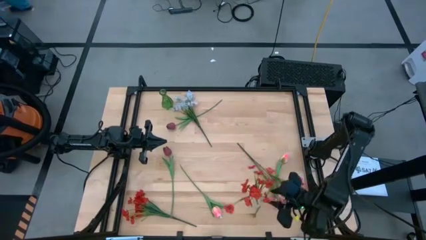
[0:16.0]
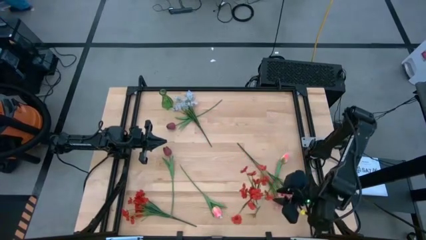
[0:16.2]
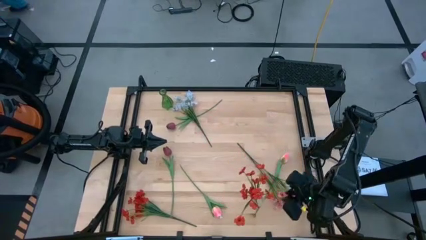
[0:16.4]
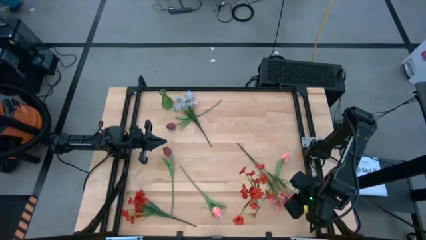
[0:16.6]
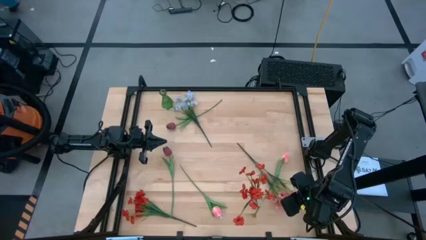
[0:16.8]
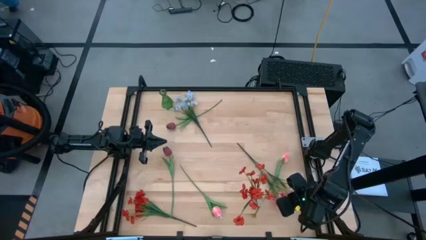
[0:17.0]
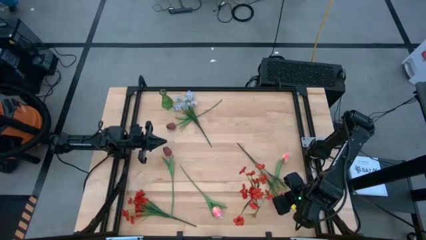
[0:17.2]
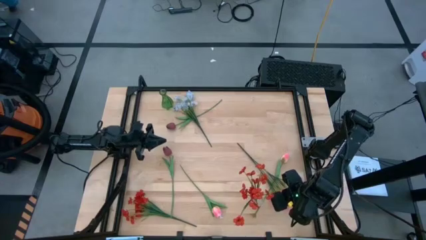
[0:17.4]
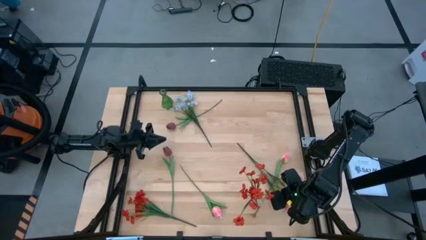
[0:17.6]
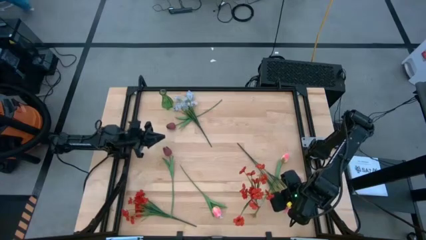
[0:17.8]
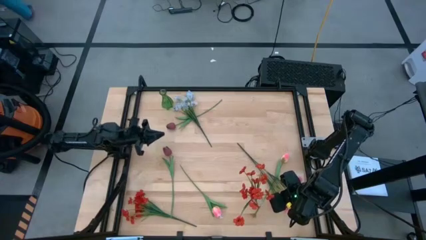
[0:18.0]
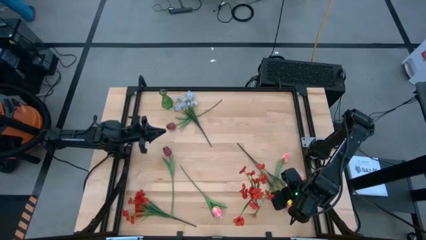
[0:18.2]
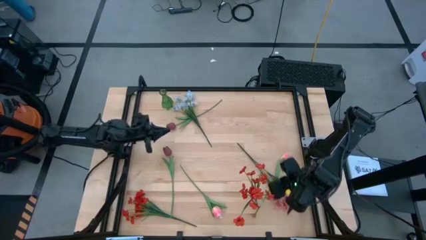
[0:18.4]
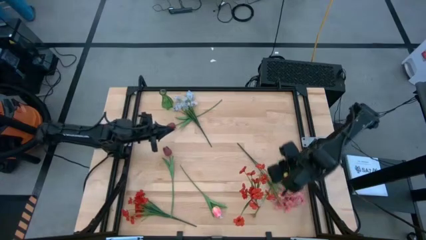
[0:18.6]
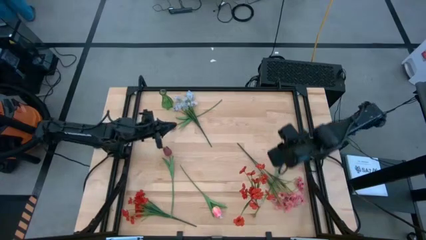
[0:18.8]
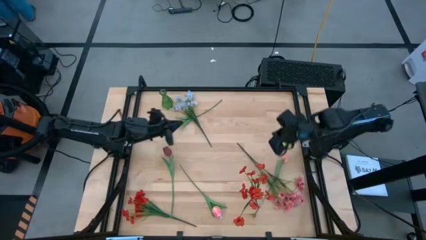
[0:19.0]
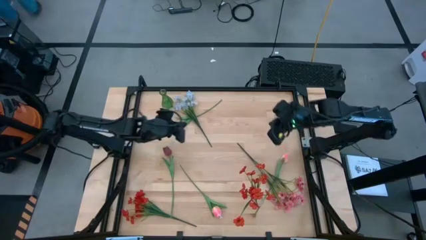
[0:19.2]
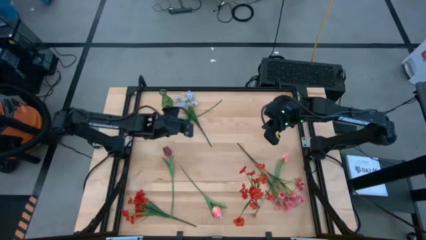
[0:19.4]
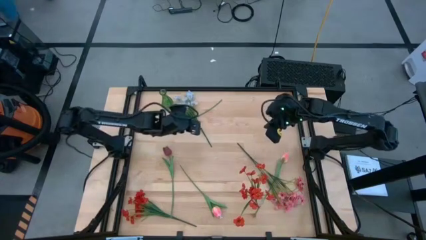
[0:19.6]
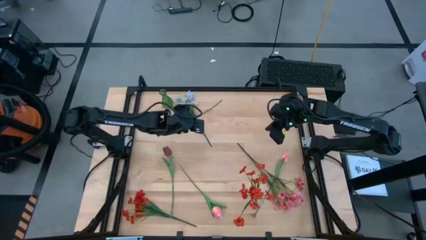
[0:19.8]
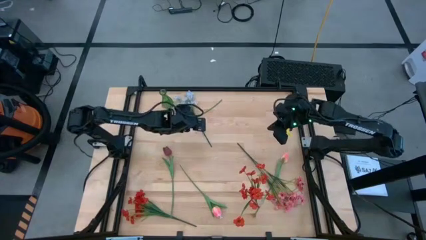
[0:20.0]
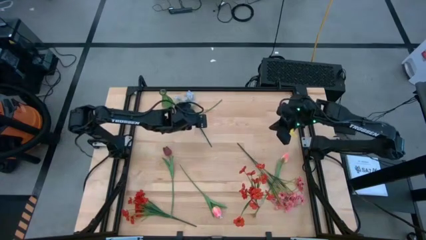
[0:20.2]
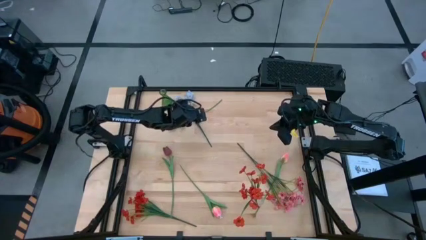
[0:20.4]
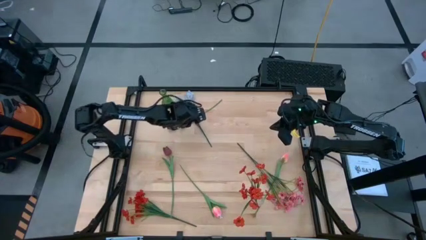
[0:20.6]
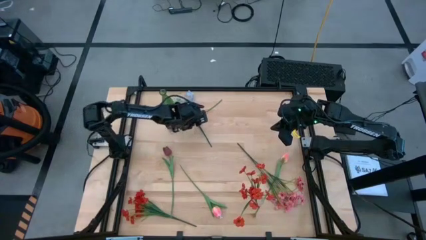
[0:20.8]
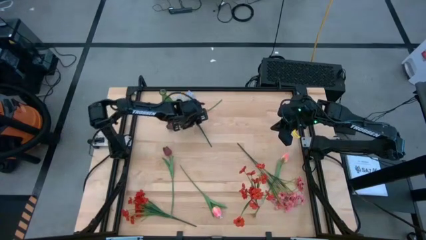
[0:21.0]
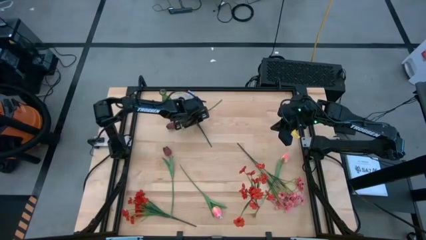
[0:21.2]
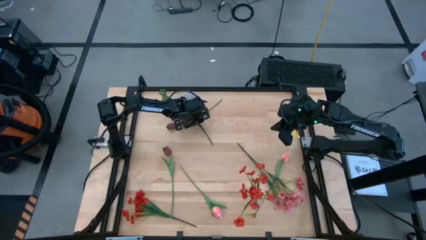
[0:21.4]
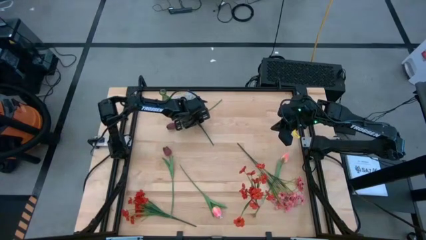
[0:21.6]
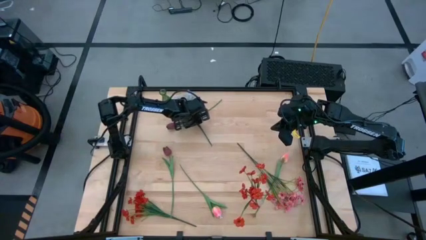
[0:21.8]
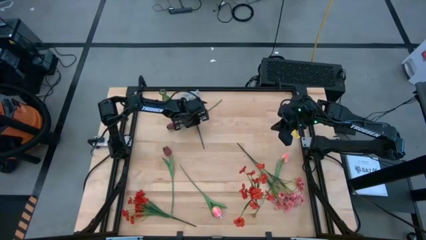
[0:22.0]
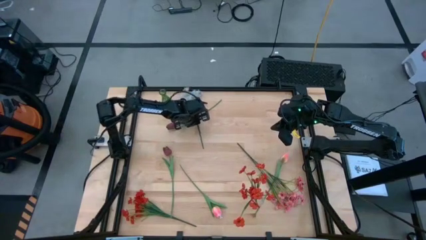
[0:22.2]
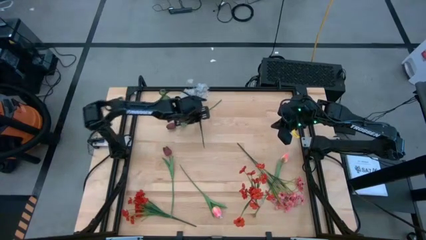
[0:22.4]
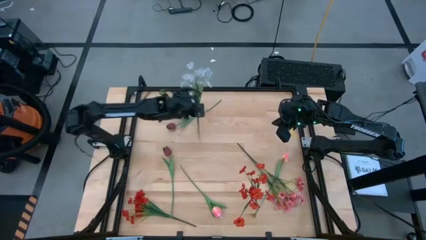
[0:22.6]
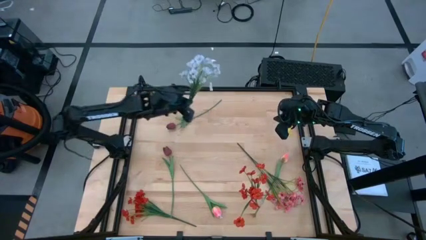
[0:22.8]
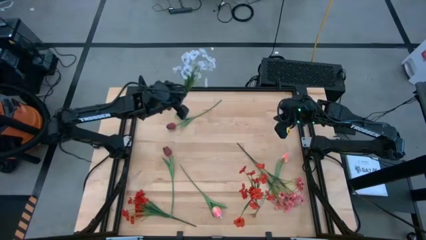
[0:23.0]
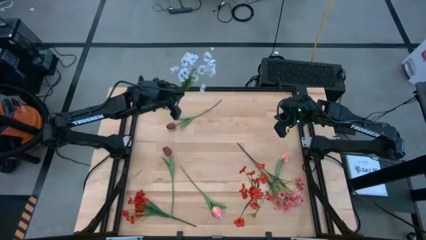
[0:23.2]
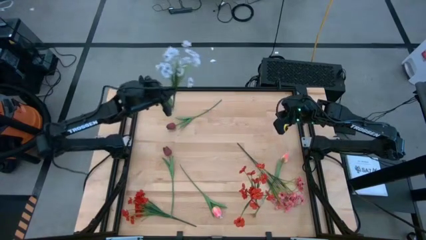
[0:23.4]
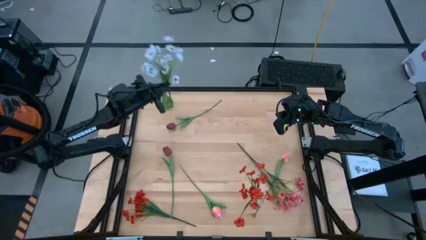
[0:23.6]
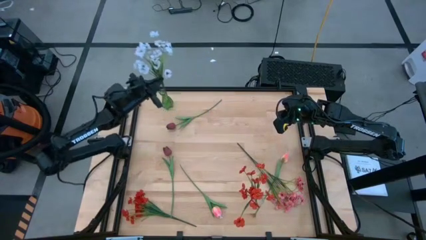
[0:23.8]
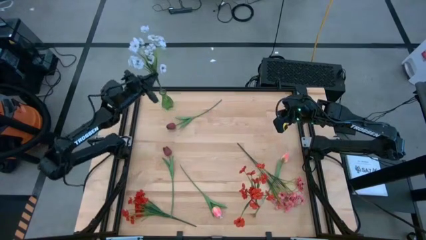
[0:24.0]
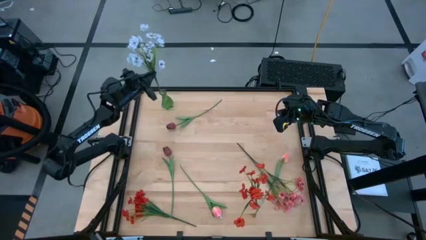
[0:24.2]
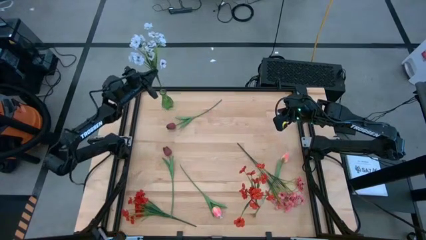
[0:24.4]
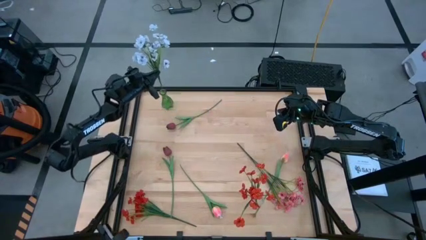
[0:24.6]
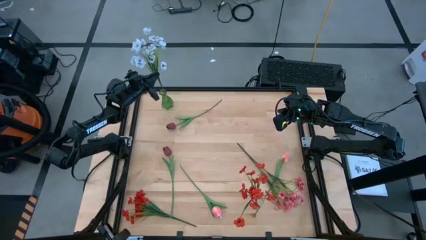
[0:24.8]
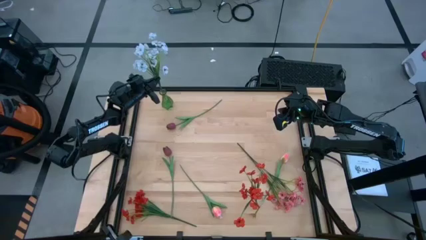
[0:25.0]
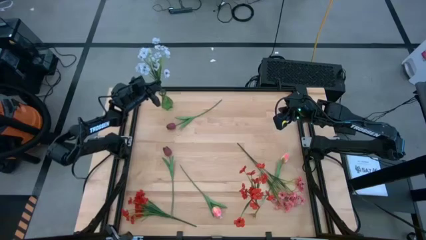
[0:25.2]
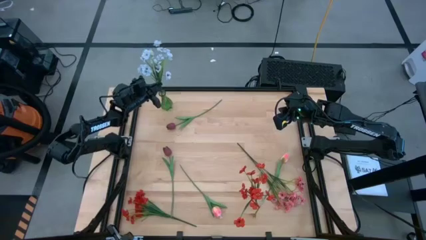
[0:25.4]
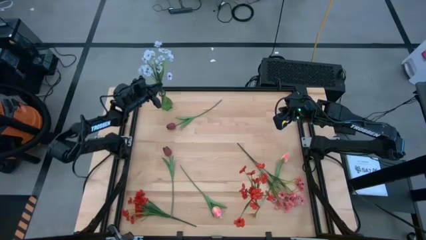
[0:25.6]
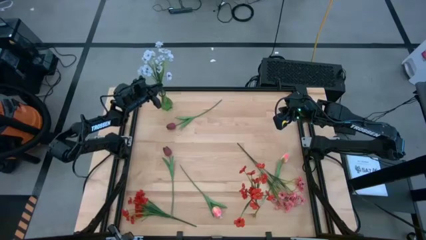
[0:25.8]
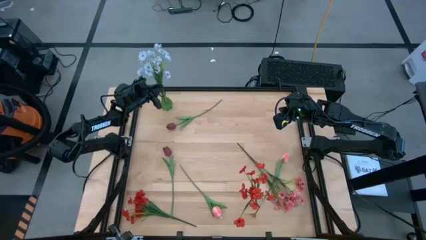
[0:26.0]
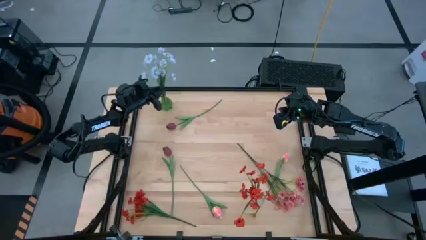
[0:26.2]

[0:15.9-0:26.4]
Task: Sort flowers into vase by color
Put the light blue flowers into the green vase

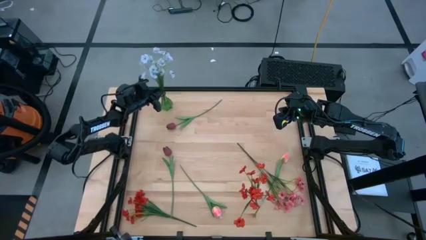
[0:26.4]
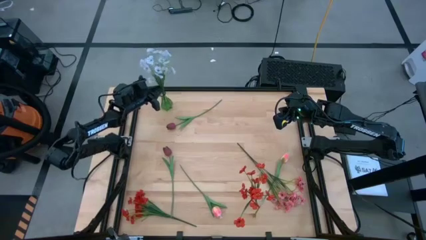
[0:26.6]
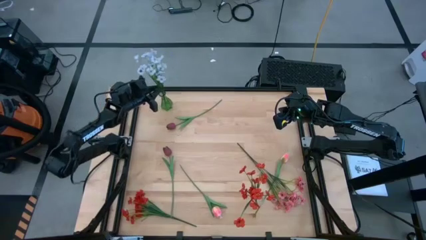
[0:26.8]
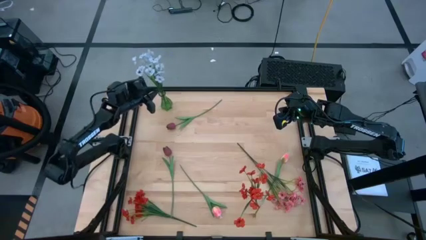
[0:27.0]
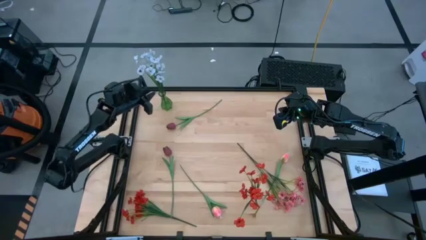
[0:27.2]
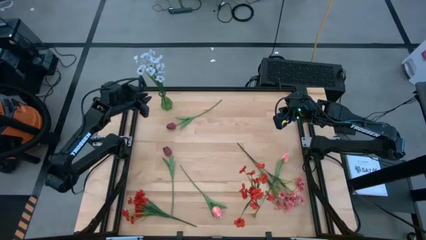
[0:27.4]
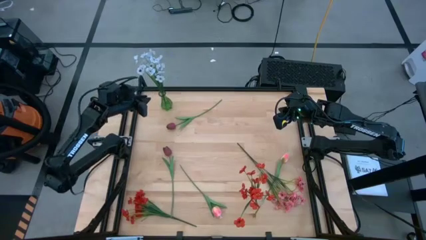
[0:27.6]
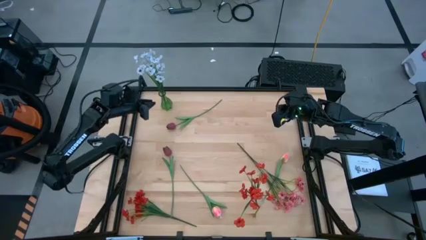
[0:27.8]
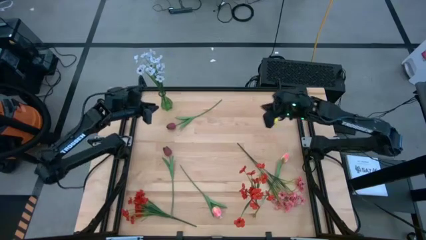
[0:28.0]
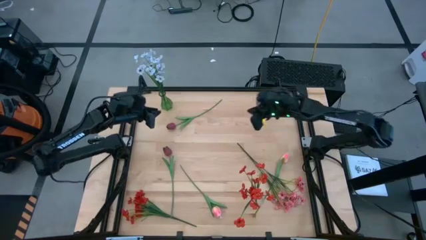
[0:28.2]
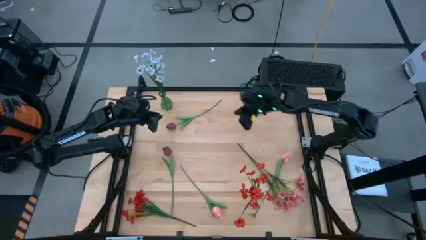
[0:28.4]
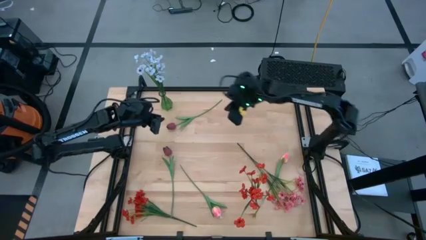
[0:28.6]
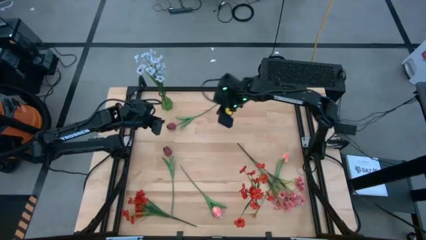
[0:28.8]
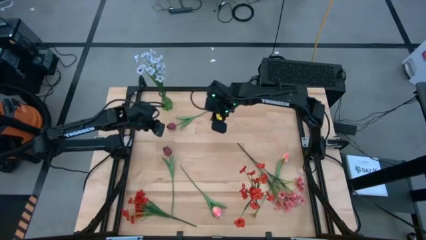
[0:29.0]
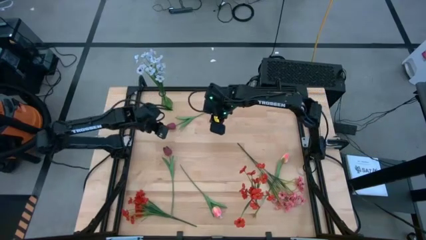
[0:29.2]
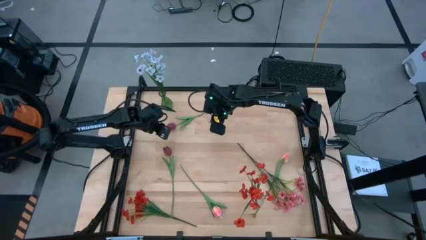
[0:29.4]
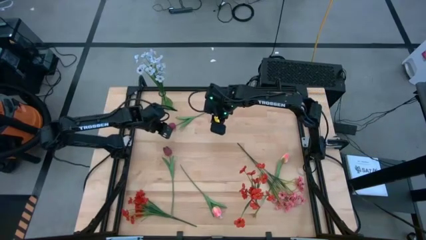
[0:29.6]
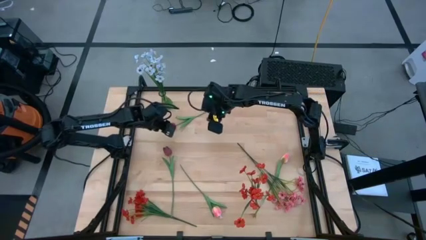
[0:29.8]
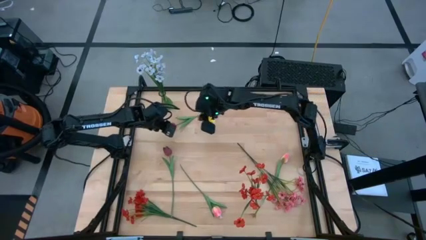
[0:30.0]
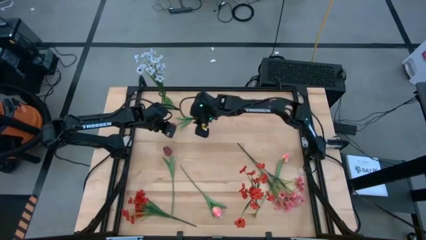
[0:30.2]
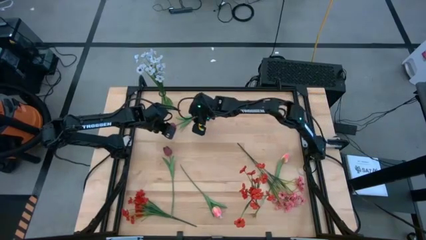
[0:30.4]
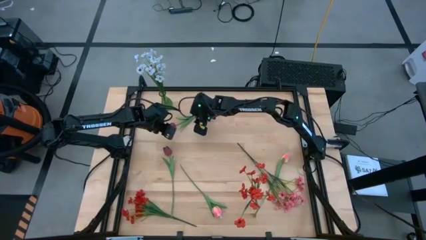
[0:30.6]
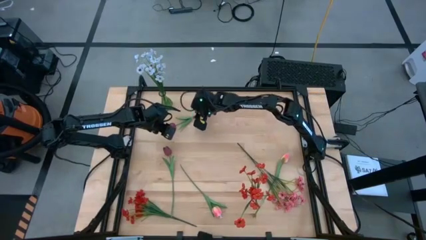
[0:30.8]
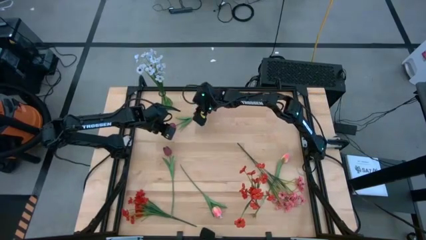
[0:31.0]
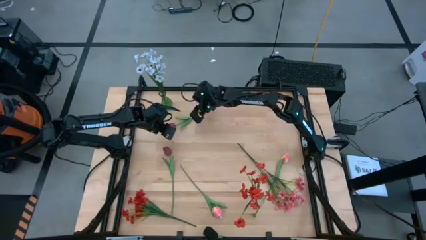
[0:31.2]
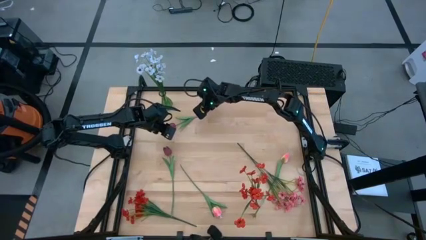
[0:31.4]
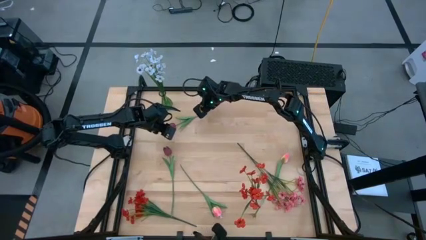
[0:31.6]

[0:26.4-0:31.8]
Put the top red tulip into the transparent vase
